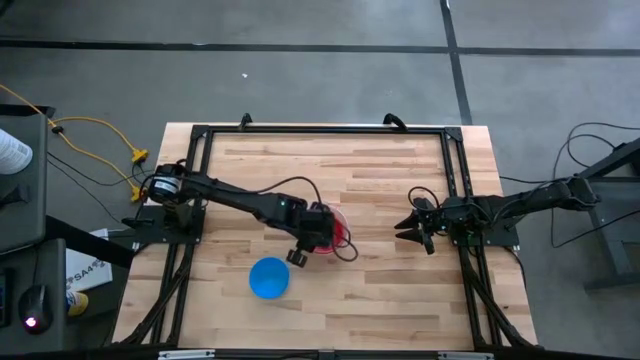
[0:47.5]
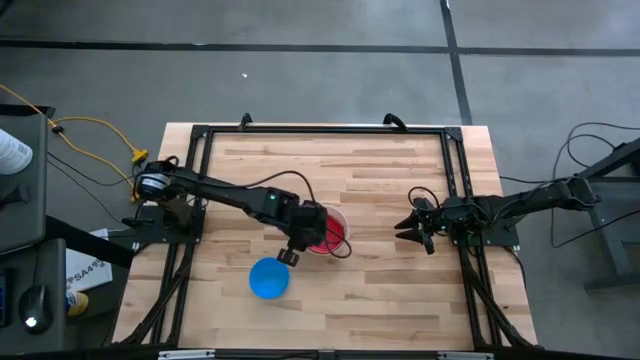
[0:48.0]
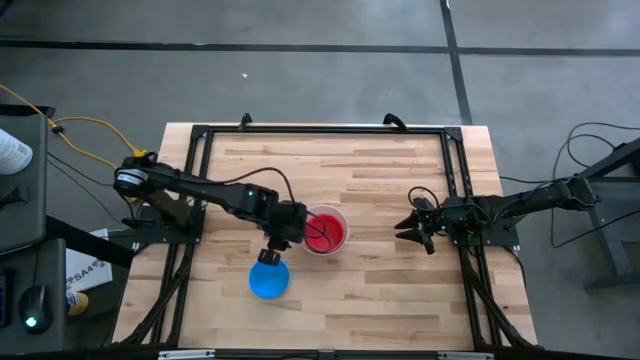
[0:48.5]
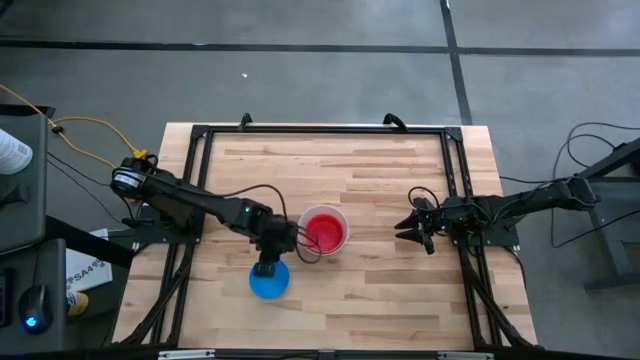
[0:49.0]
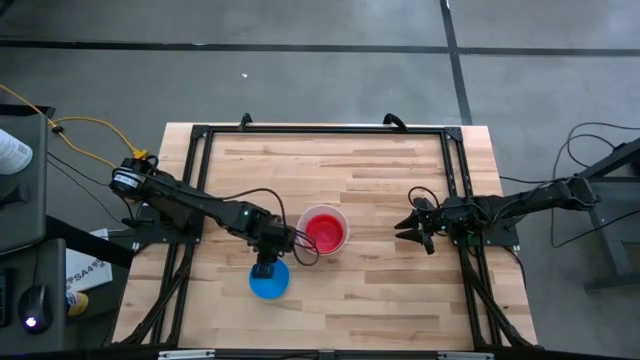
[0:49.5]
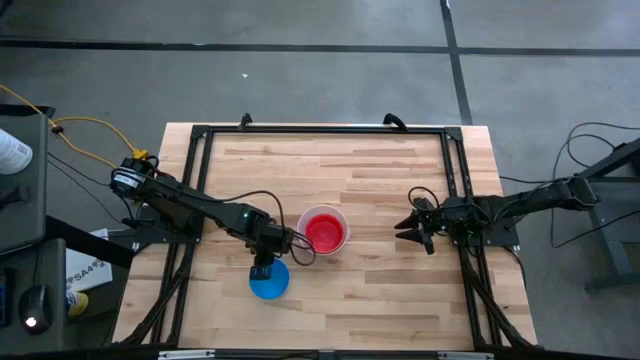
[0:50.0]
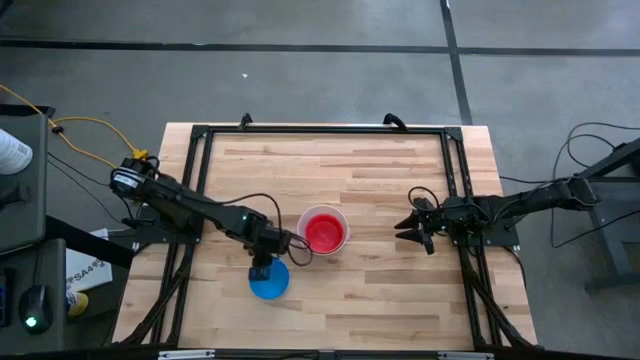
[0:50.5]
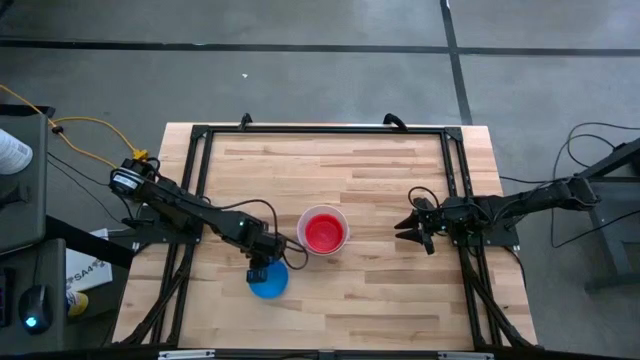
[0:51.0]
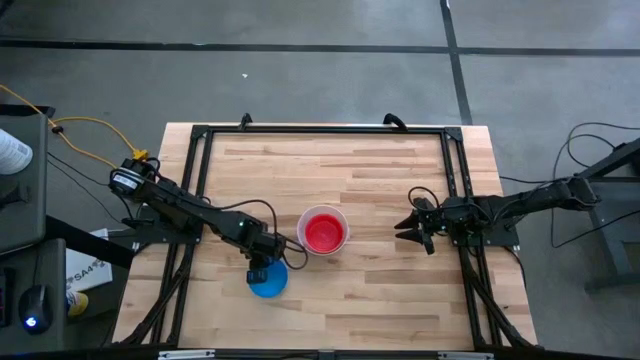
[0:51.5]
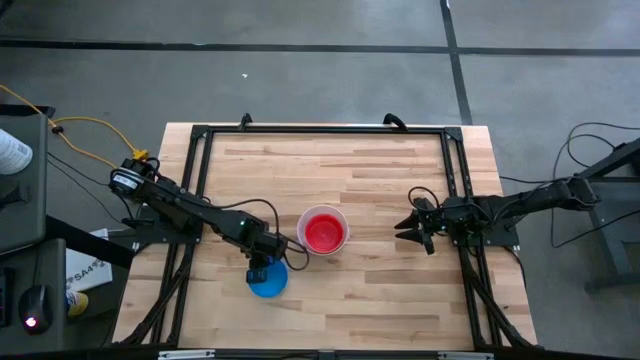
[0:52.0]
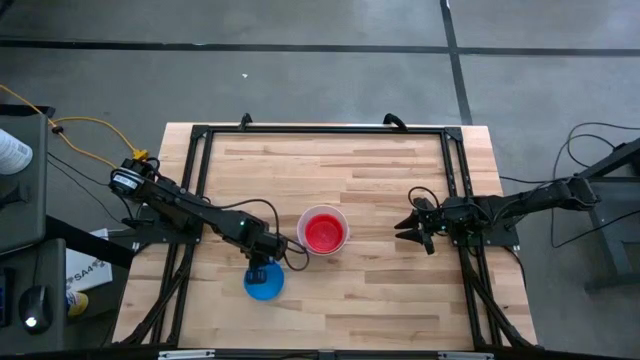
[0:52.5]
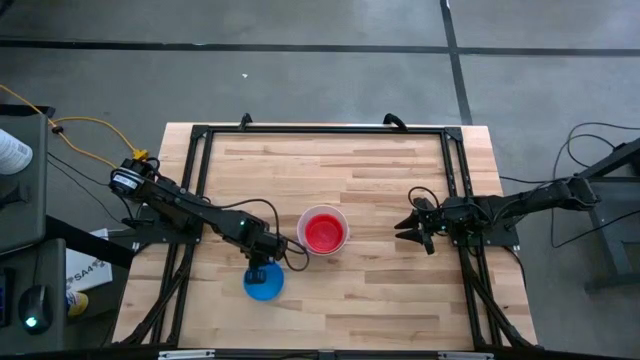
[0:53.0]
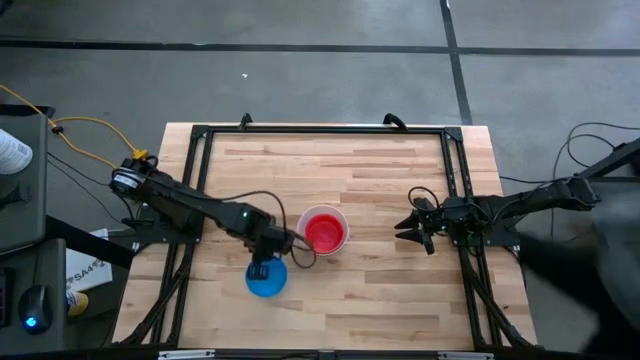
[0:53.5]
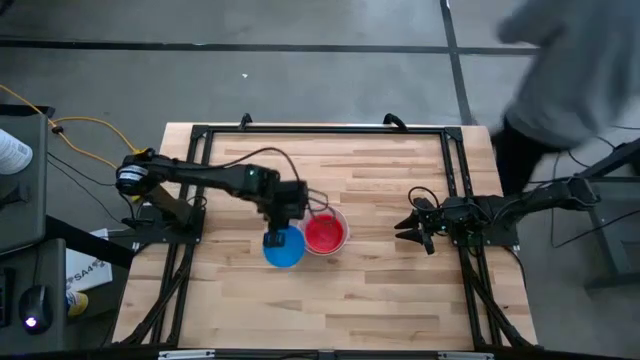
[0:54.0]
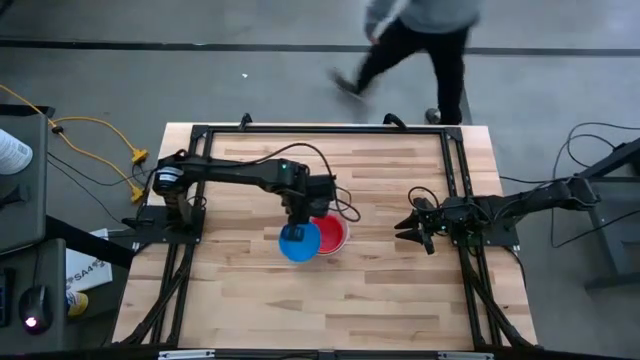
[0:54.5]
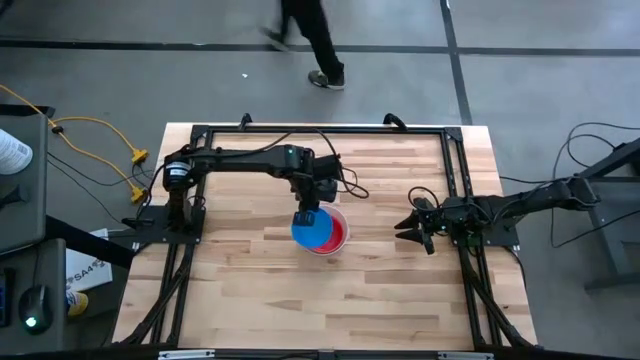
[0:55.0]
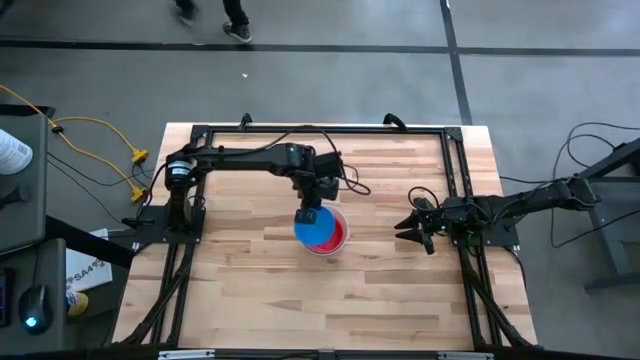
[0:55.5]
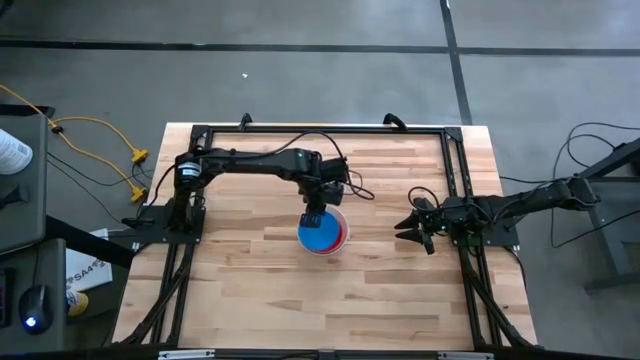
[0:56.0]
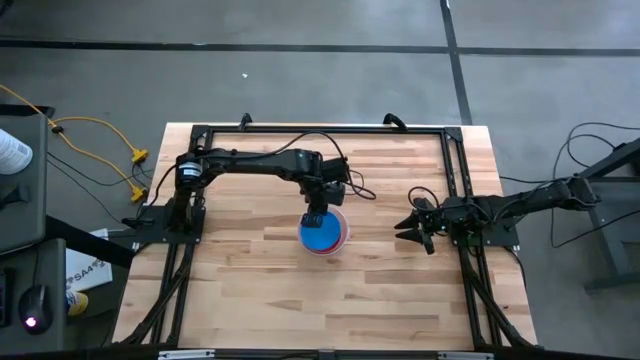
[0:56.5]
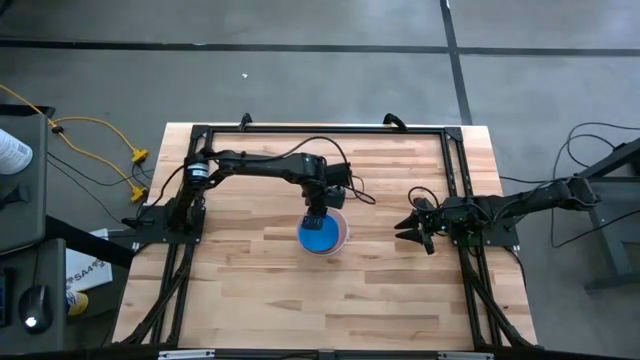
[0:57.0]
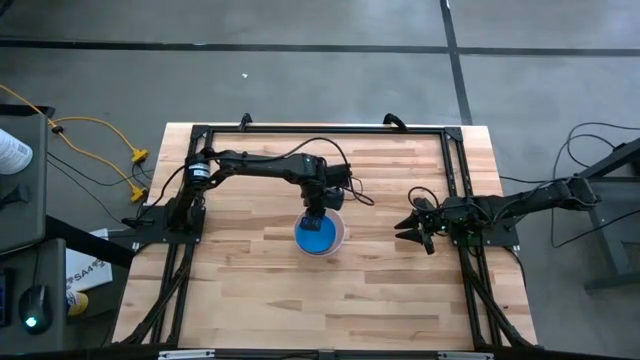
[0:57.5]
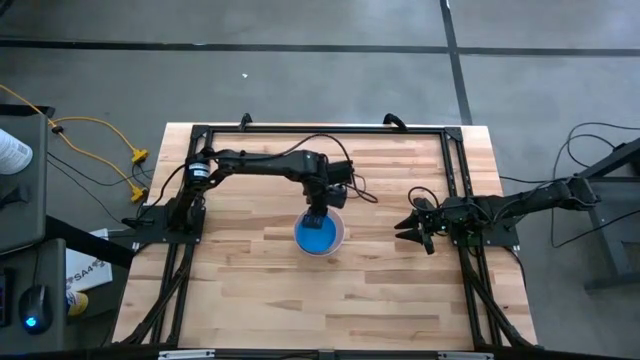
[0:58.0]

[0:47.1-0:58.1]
Stack the blue bowl on the red bowl

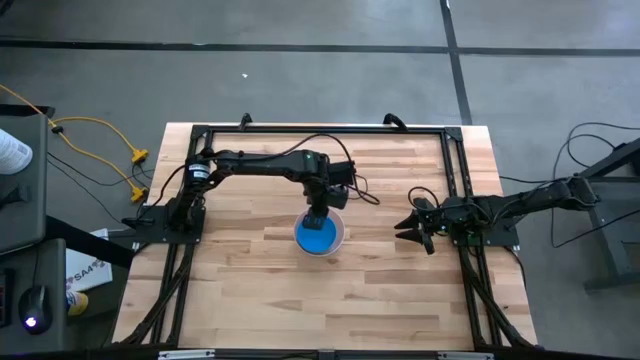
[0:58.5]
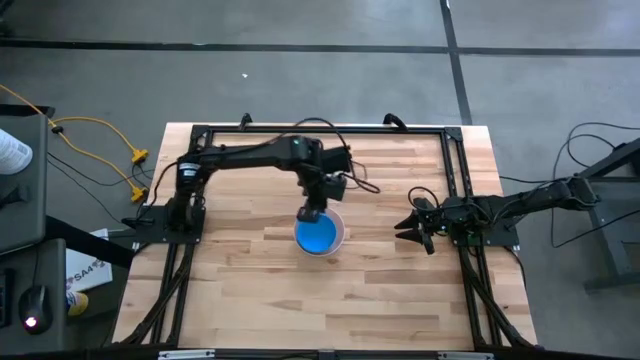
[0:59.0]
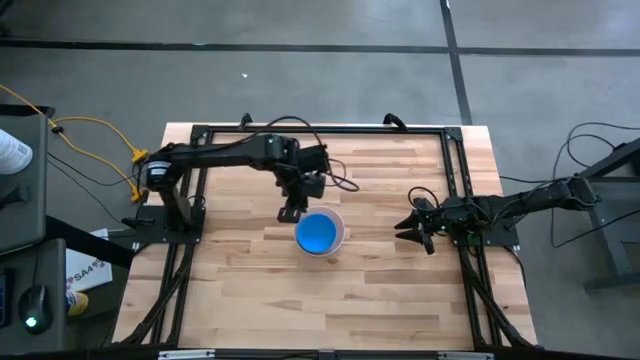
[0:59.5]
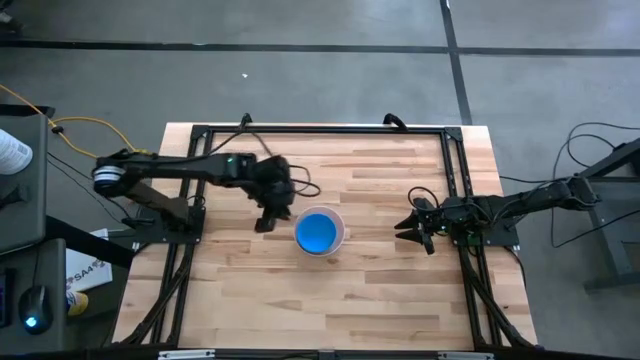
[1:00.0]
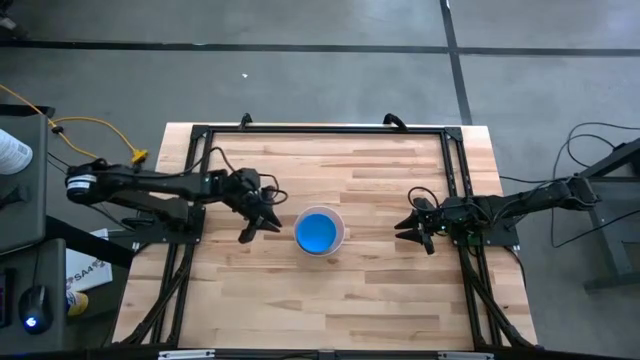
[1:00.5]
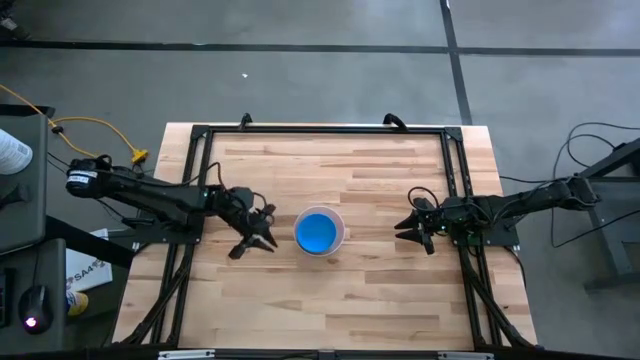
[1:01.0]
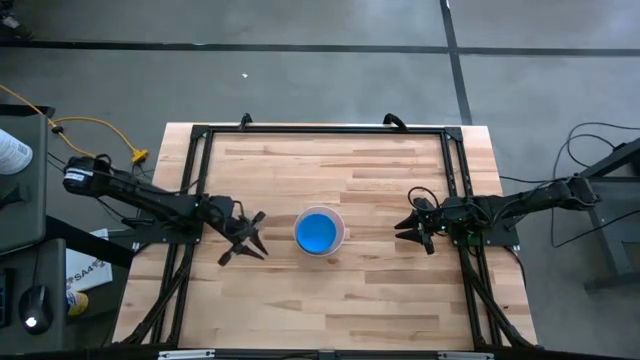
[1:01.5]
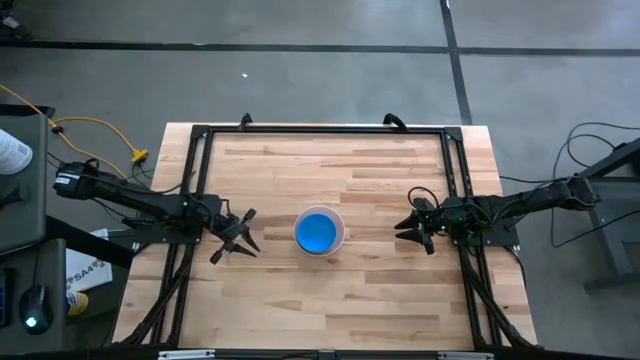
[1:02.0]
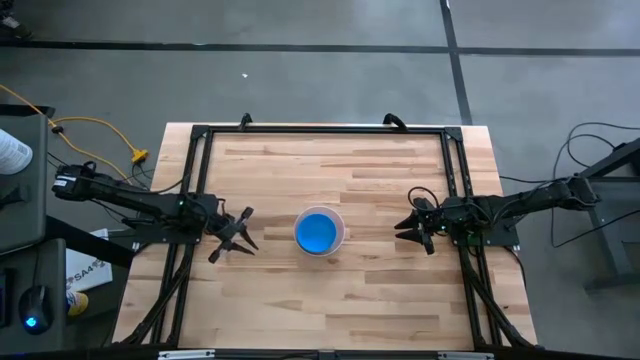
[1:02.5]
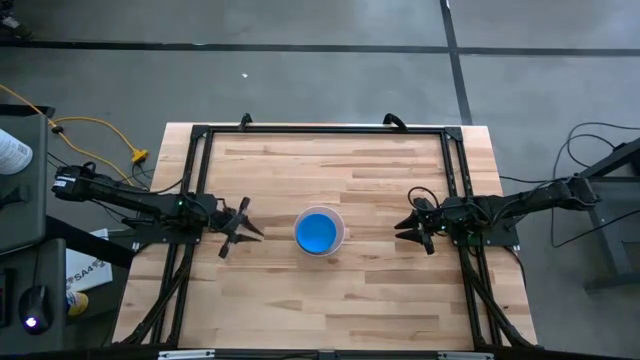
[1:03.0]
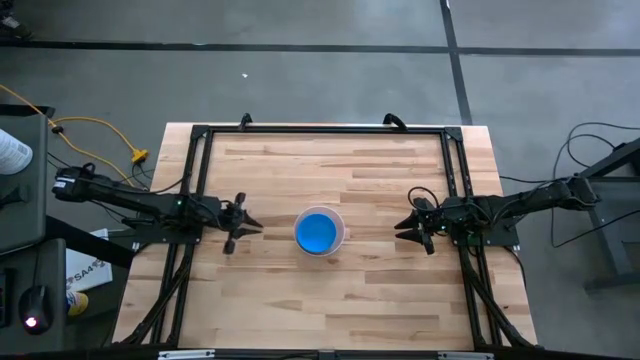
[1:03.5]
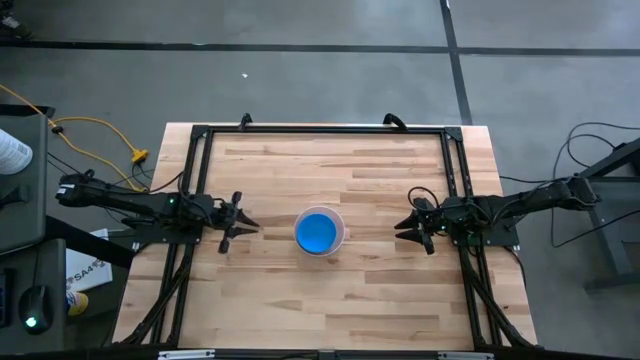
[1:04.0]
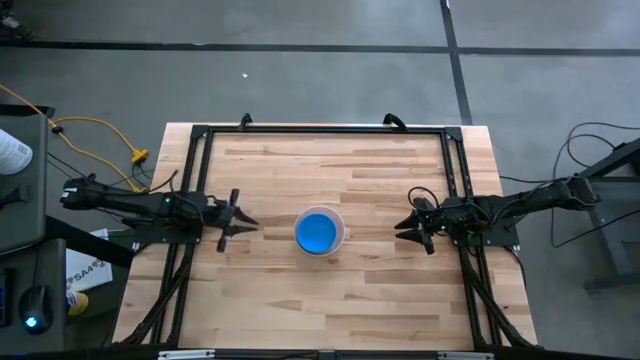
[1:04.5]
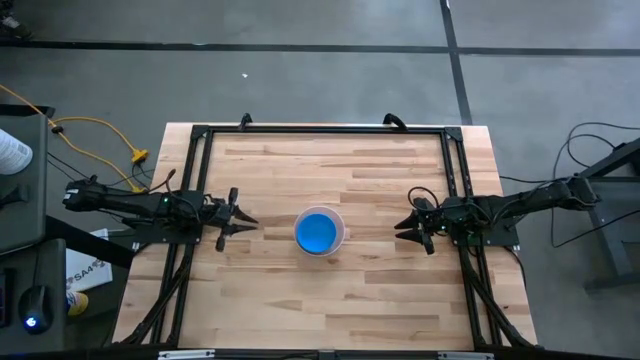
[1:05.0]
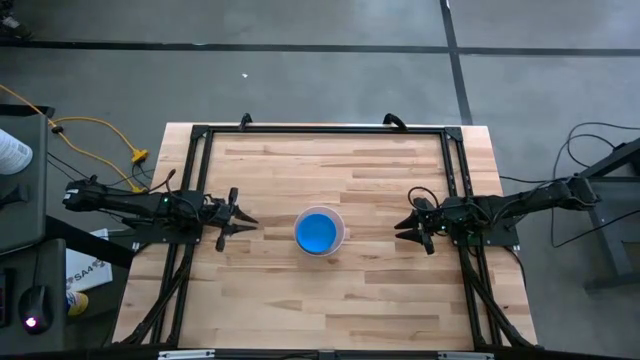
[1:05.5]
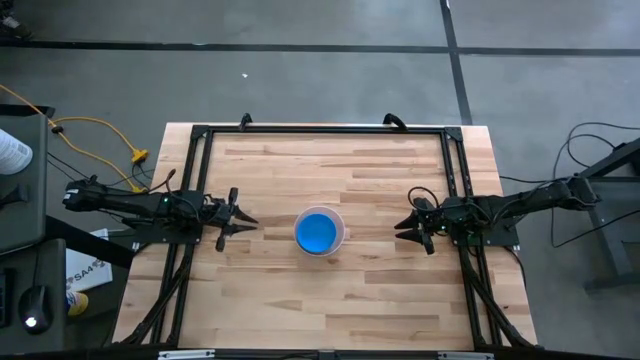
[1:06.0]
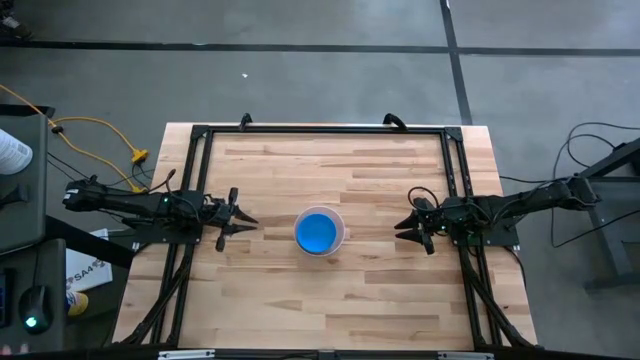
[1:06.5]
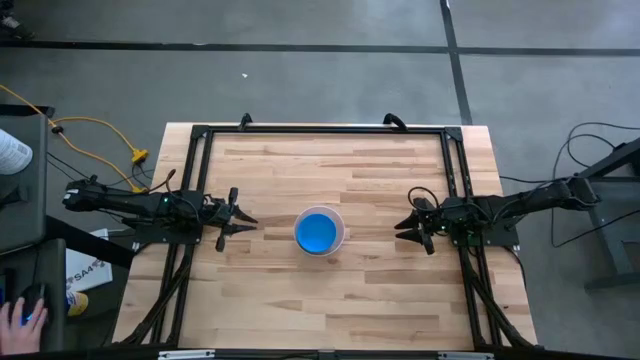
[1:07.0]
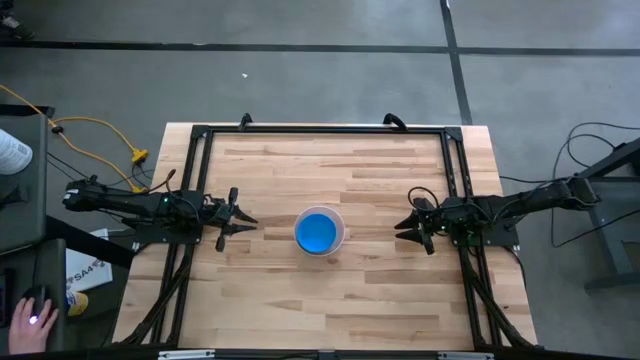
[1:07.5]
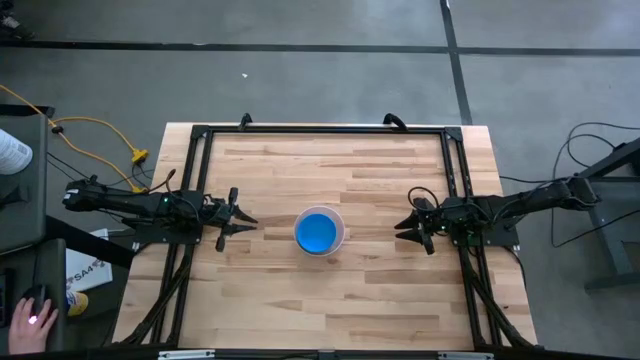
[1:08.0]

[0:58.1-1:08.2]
Return to Home Position
